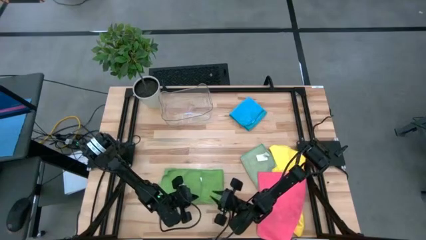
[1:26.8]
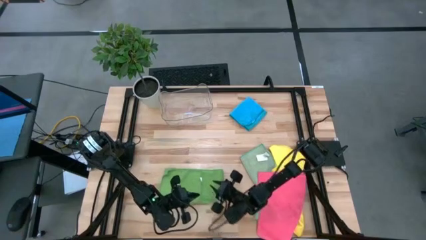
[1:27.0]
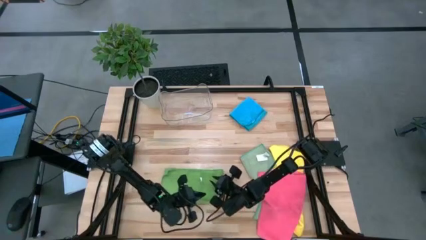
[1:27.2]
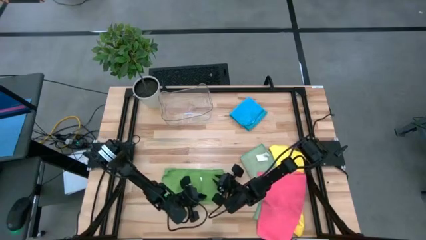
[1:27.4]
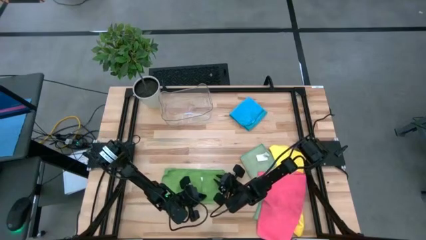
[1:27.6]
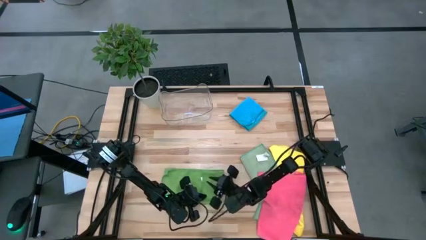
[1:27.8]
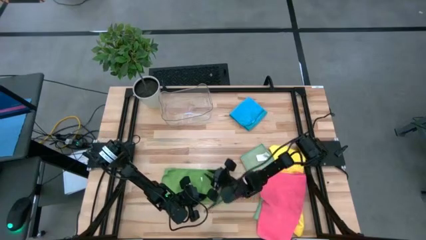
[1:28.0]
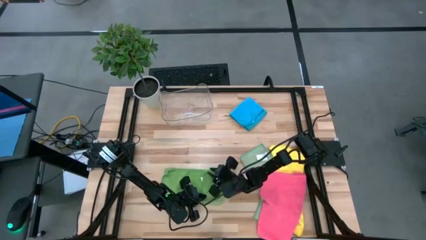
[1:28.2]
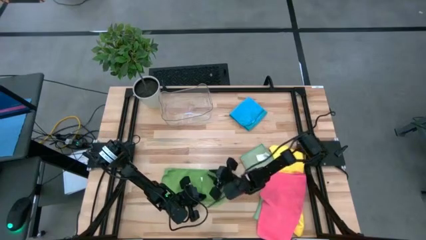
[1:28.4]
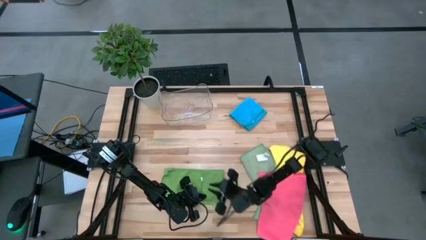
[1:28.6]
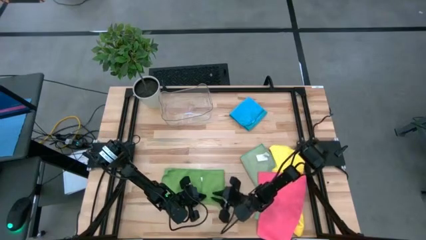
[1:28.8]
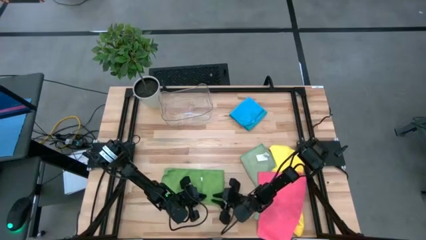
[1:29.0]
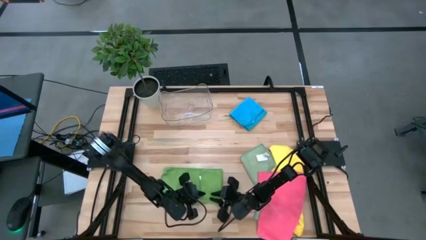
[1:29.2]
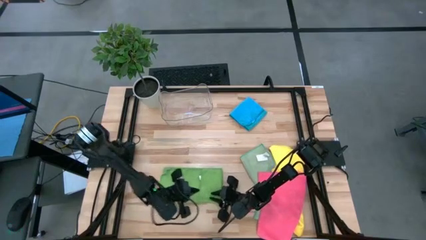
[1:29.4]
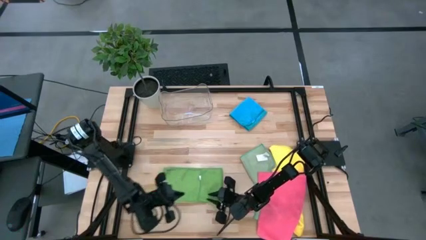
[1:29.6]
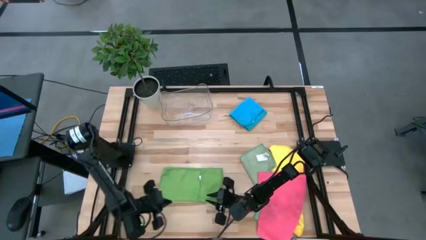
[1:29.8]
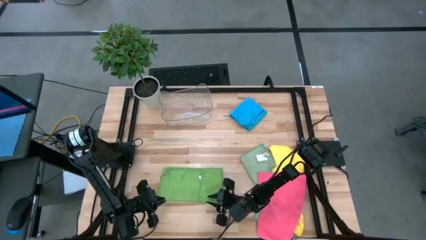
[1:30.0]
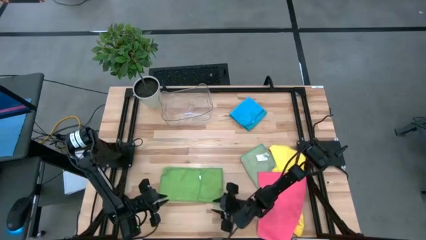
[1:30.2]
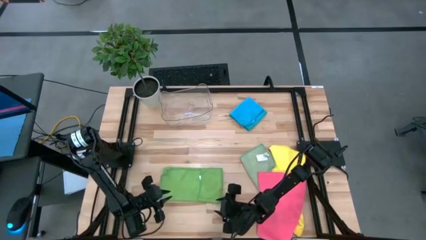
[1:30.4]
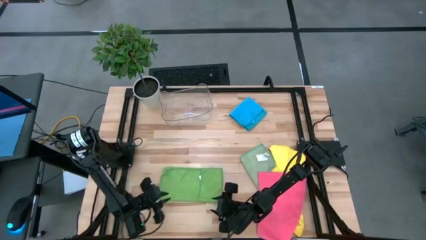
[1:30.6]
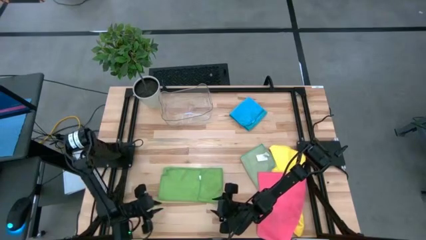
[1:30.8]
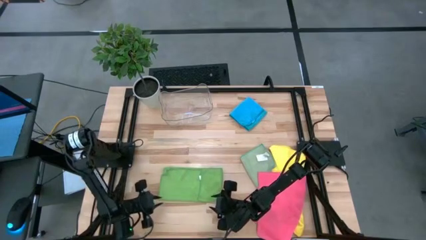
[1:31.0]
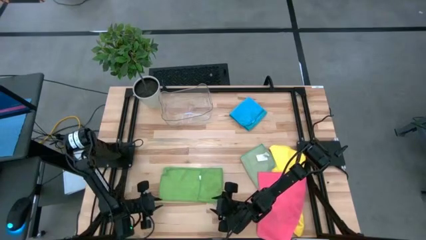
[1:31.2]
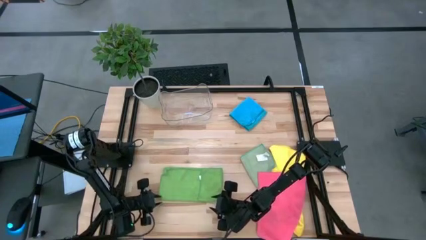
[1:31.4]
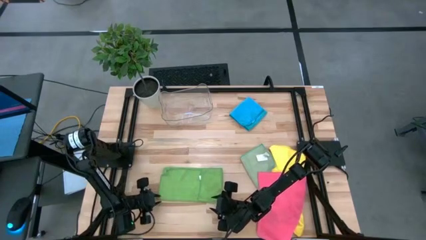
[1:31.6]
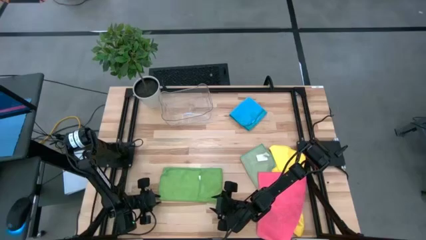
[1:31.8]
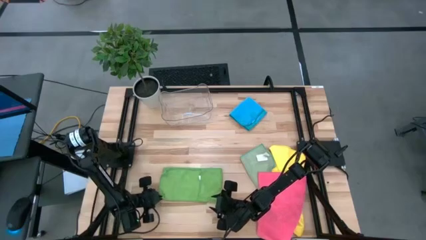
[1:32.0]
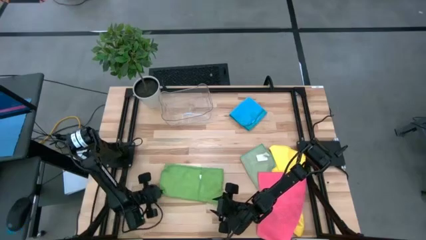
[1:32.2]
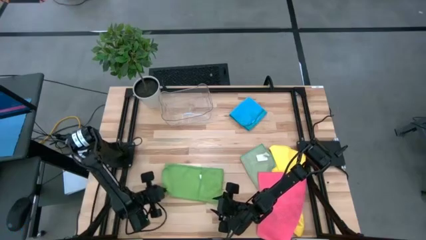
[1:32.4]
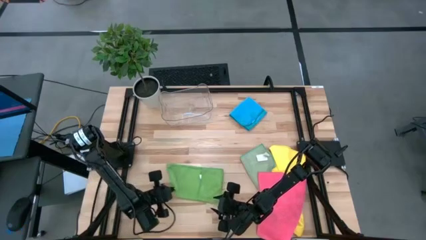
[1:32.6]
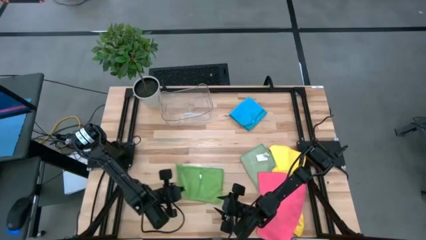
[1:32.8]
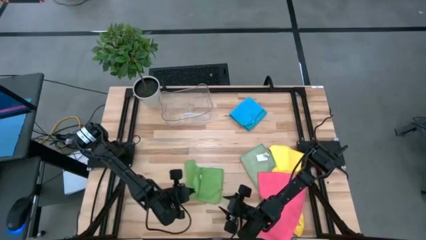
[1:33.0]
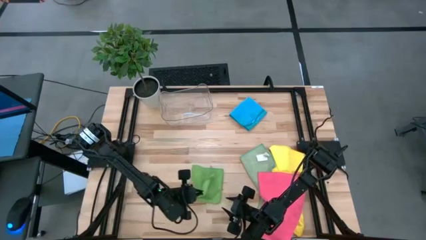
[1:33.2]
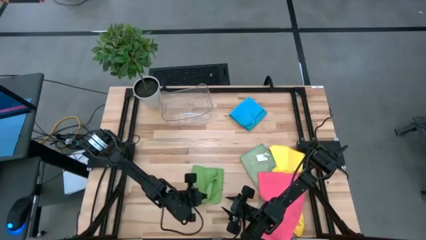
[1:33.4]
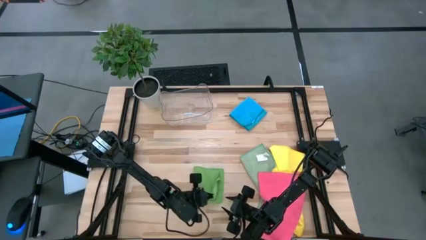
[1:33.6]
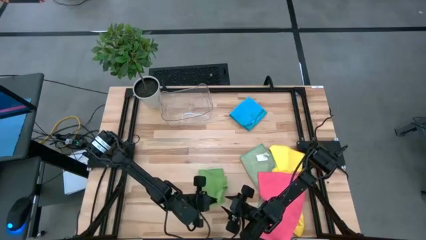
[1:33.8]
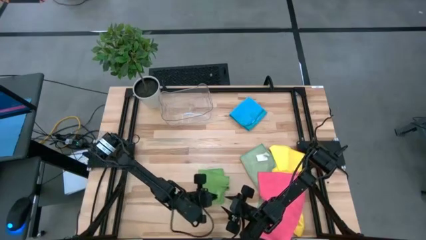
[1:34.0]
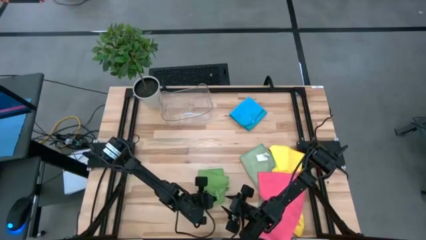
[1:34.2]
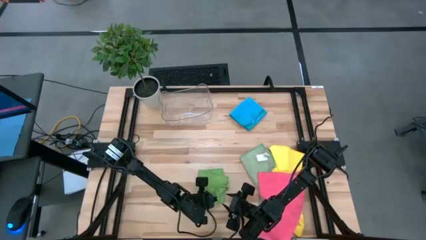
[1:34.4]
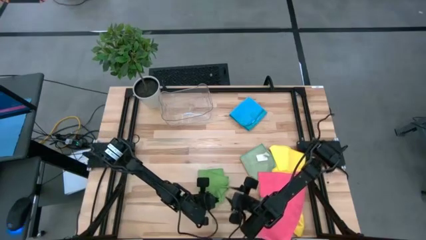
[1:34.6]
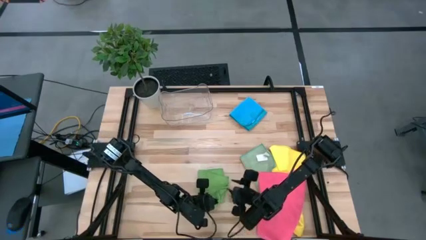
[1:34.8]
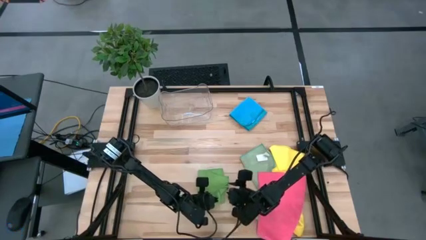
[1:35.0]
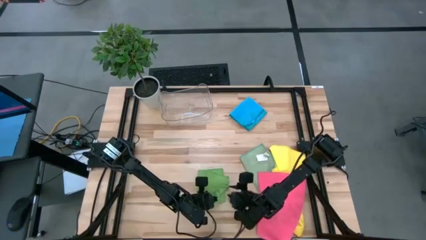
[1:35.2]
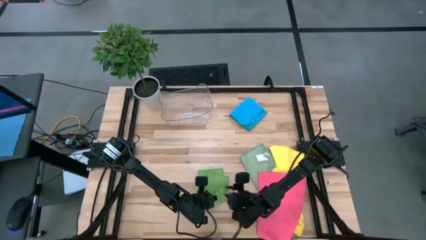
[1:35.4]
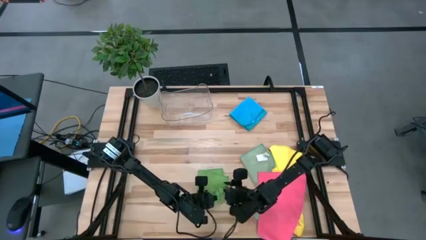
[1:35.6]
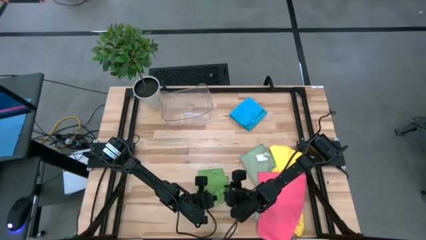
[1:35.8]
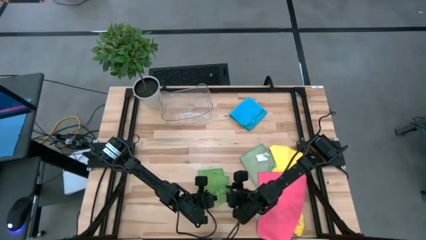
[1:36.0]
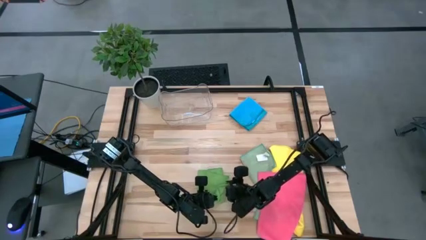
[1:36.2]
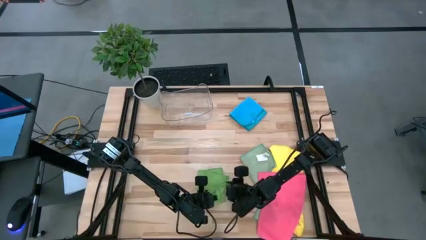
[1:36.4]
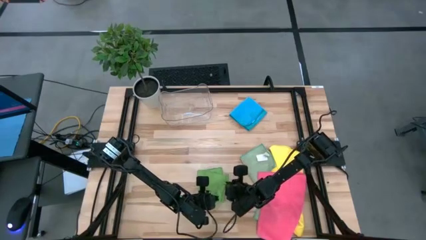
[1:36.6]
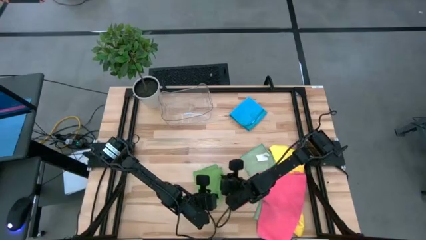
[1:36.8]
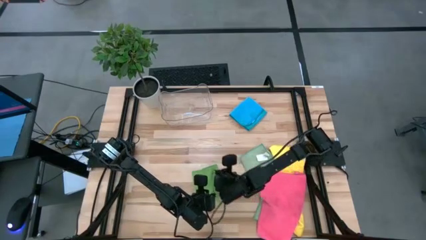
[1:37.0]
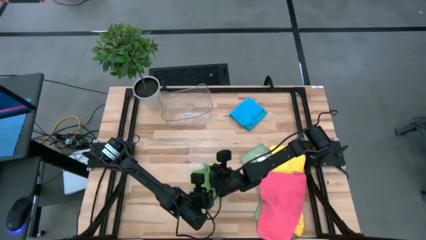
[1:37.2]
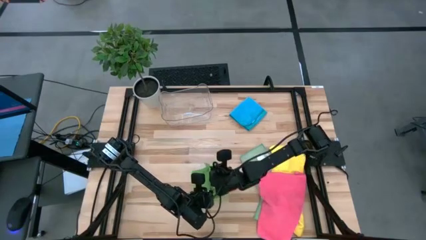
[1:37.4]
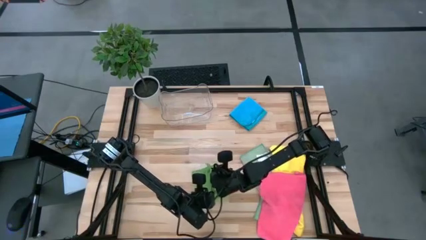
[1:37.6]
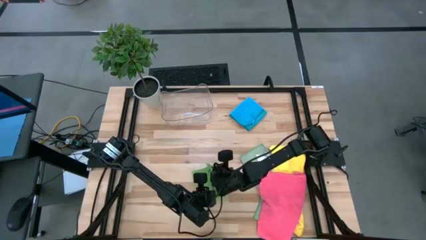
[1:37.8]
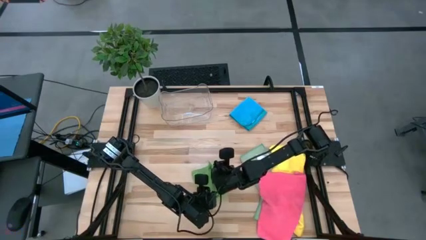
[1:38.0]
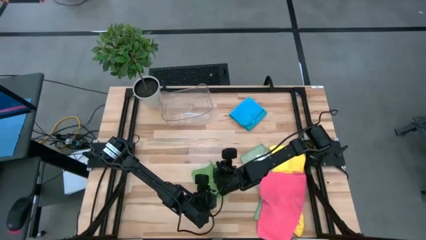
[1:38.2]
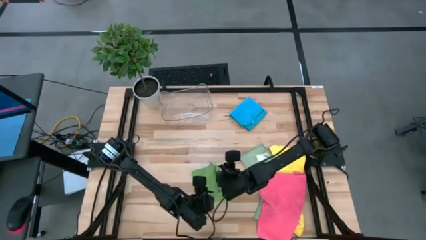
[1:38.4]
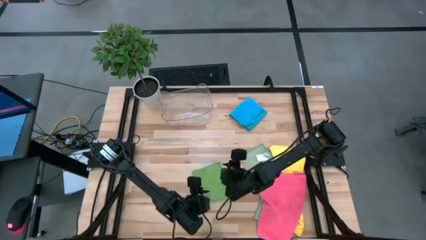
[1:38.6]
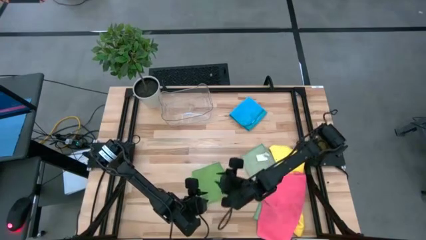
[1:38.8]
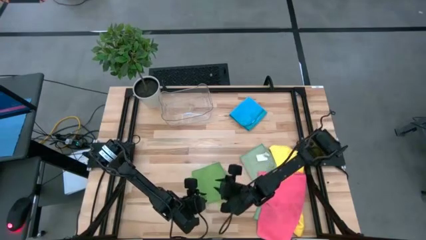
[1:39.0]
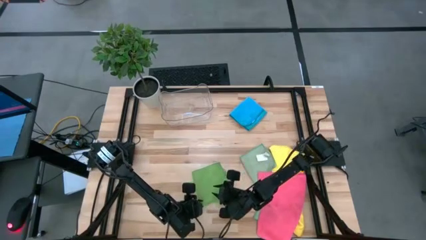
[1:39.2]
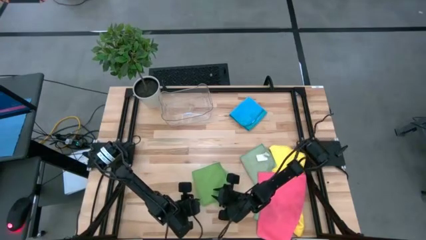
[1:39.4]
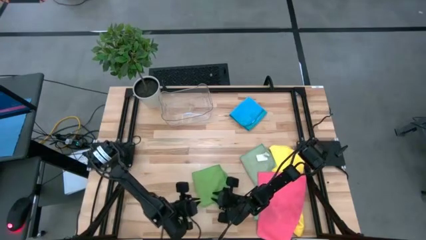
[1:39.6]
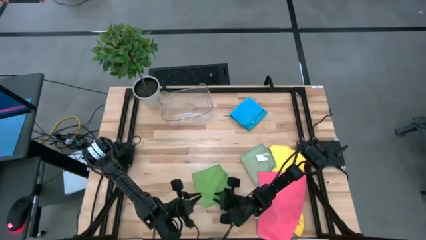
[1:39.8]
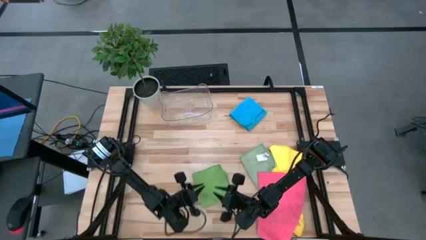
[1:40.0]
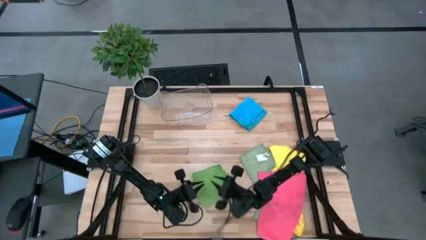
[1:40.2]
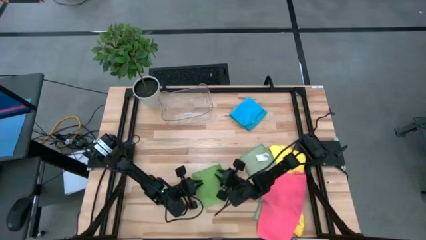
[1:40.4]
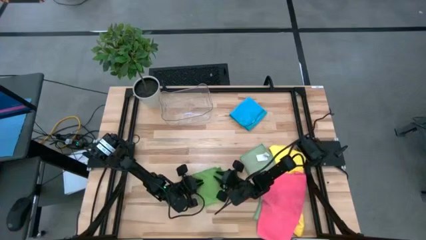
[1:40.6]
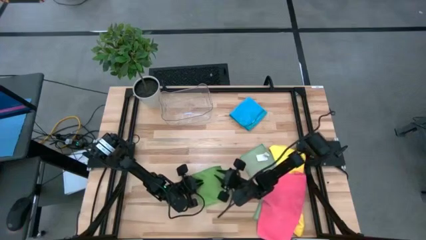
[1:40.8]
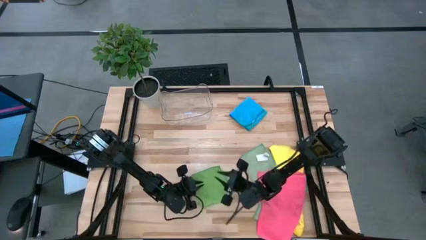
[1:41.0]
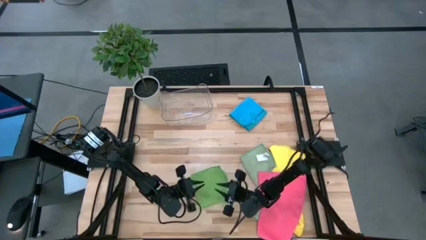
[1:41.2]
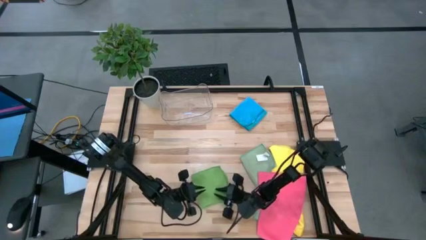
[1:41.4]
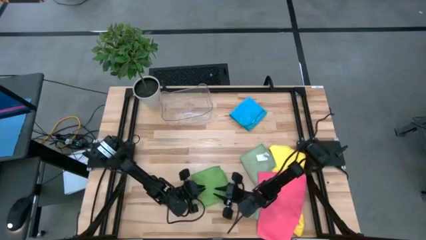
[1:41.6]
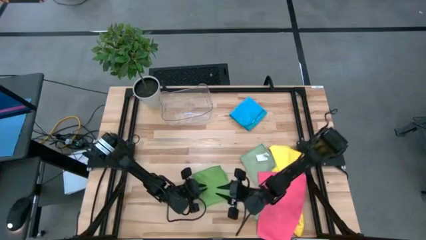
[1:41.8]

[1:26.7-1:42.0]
Task: Fold microfiber towels
Fold the green microfiber cloth
